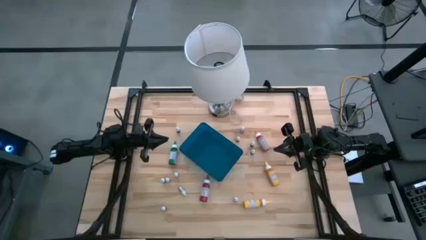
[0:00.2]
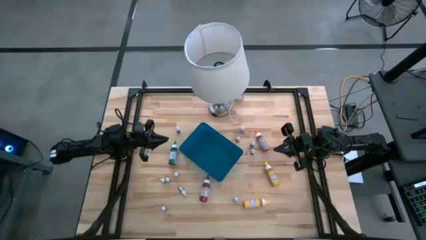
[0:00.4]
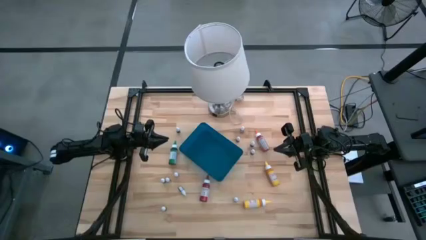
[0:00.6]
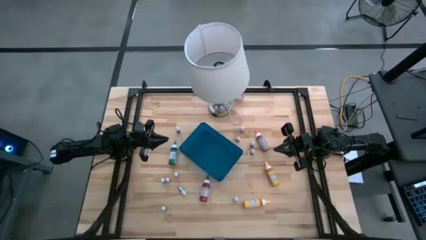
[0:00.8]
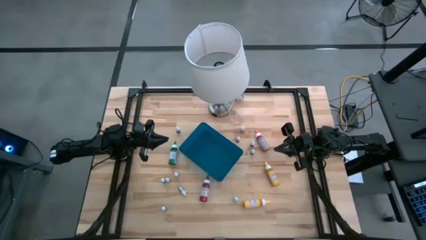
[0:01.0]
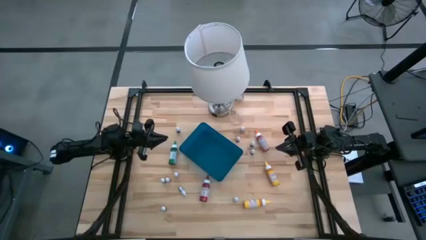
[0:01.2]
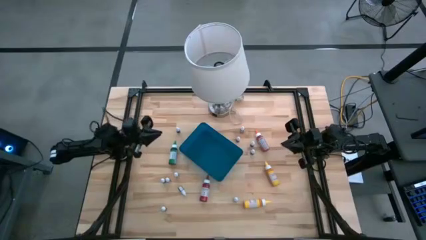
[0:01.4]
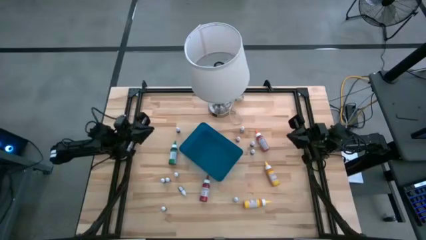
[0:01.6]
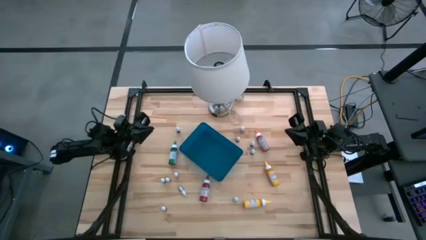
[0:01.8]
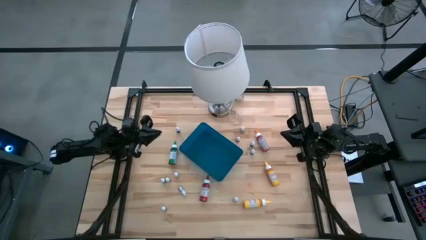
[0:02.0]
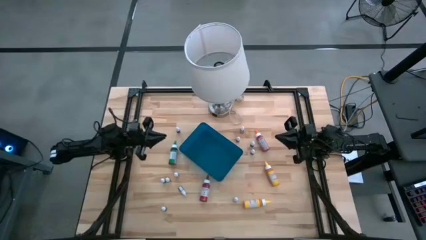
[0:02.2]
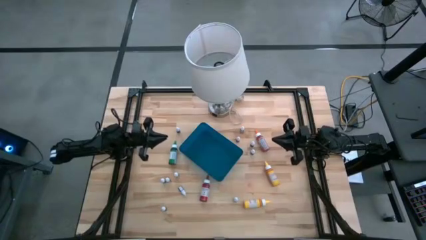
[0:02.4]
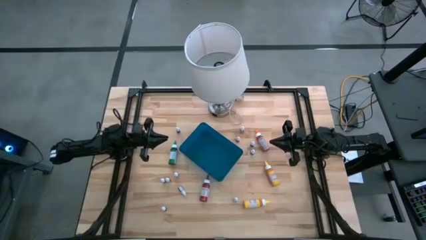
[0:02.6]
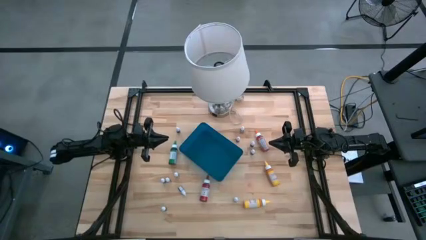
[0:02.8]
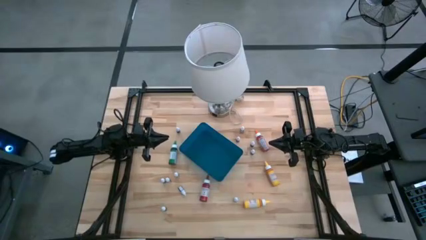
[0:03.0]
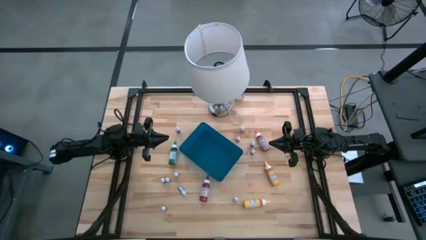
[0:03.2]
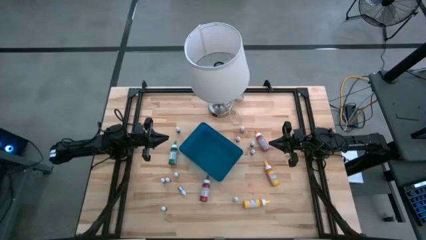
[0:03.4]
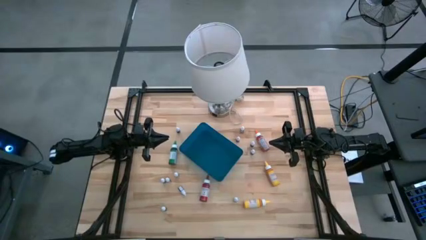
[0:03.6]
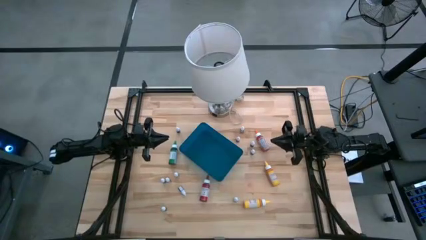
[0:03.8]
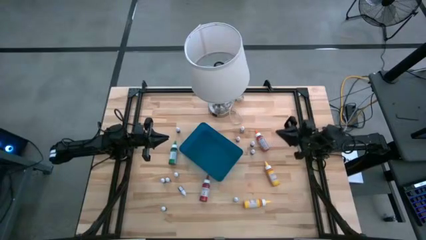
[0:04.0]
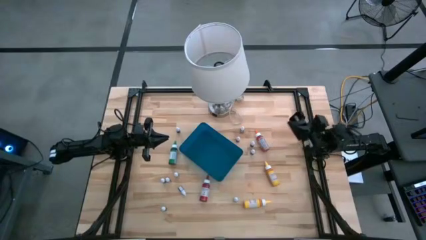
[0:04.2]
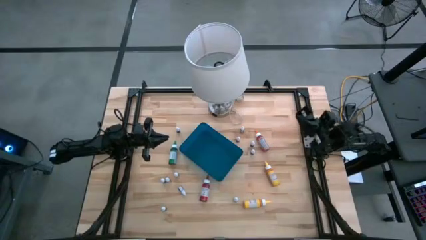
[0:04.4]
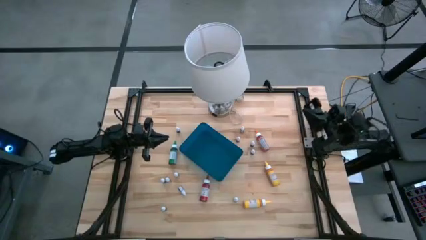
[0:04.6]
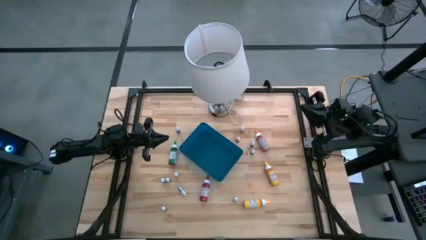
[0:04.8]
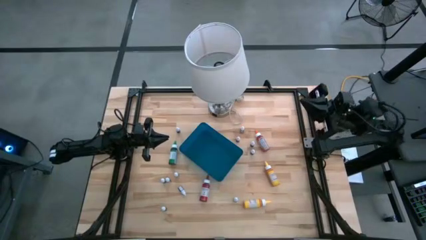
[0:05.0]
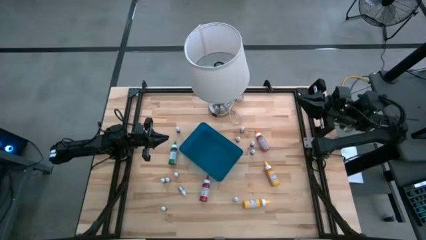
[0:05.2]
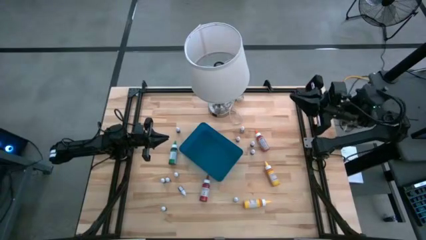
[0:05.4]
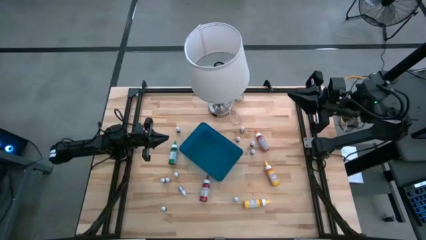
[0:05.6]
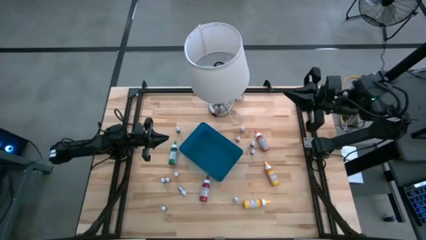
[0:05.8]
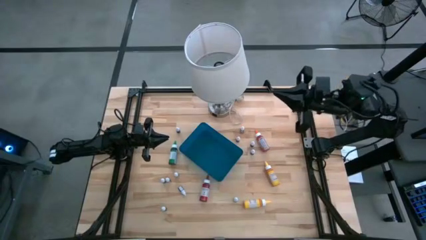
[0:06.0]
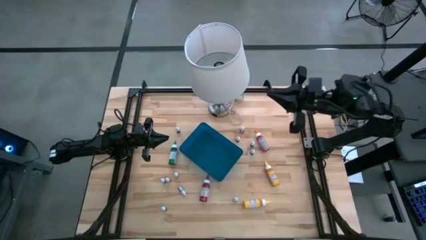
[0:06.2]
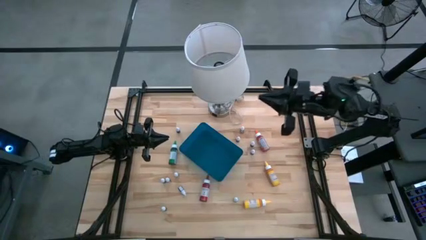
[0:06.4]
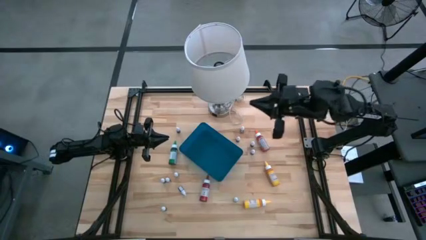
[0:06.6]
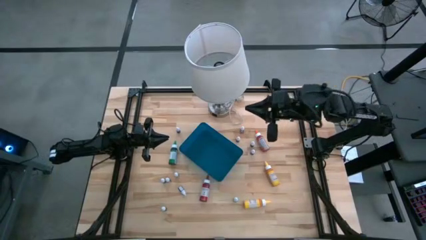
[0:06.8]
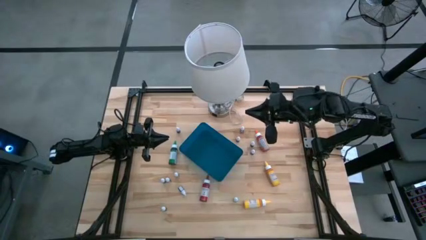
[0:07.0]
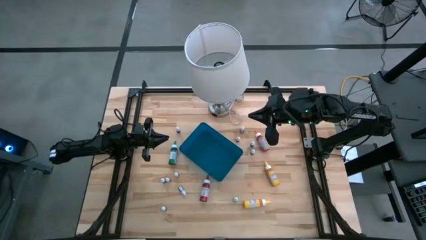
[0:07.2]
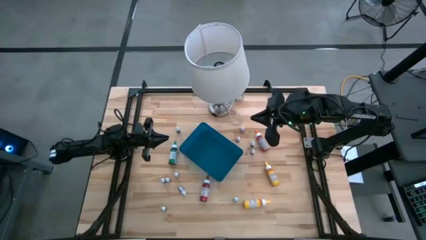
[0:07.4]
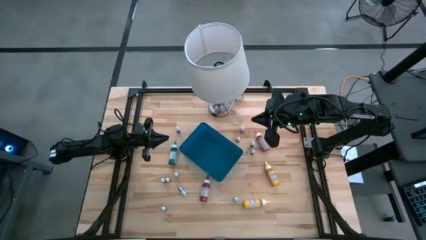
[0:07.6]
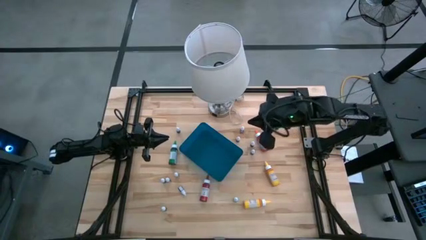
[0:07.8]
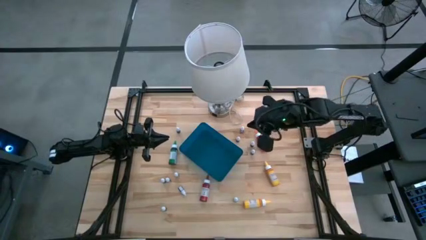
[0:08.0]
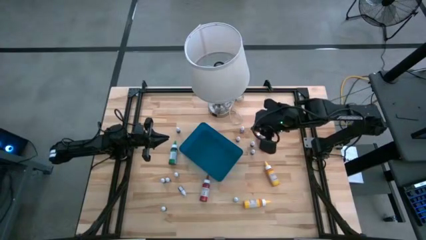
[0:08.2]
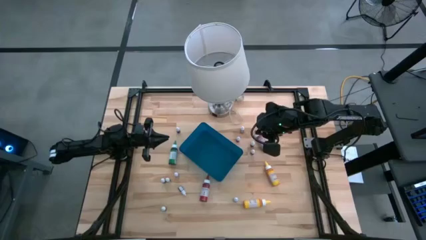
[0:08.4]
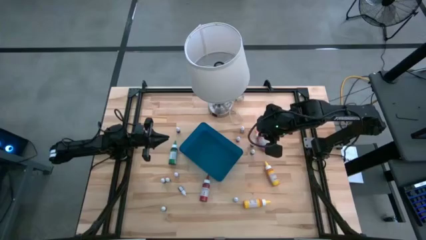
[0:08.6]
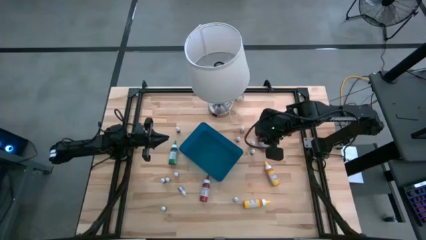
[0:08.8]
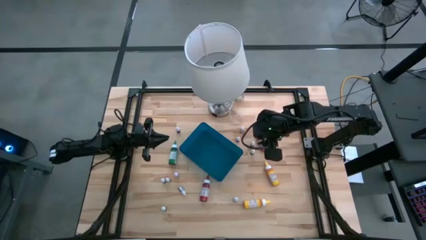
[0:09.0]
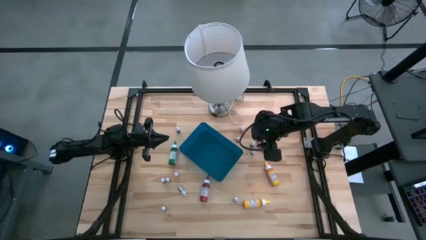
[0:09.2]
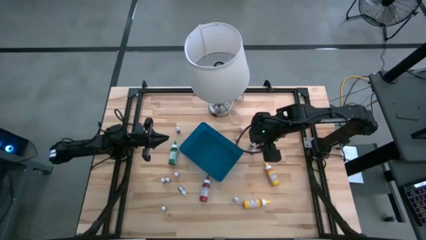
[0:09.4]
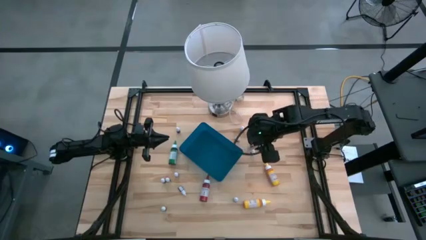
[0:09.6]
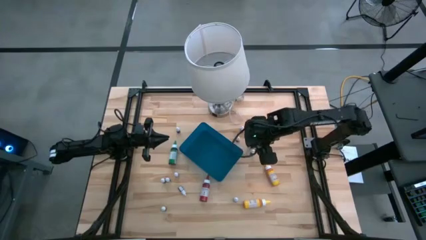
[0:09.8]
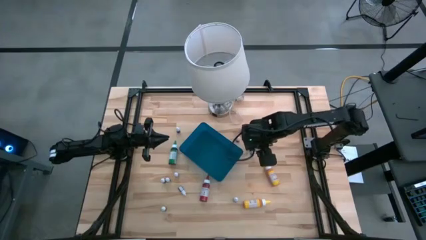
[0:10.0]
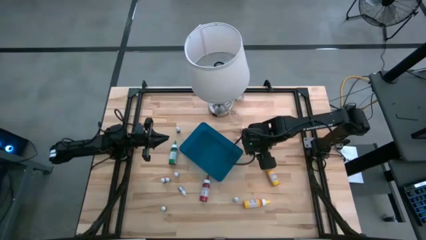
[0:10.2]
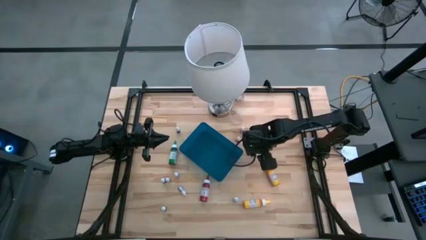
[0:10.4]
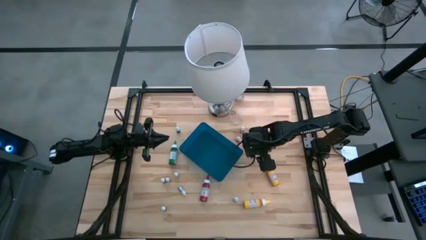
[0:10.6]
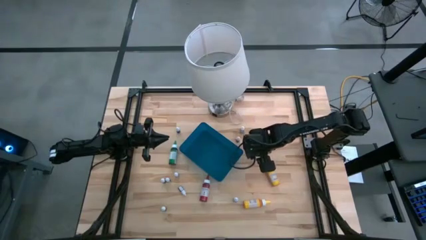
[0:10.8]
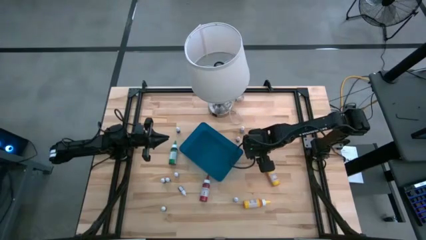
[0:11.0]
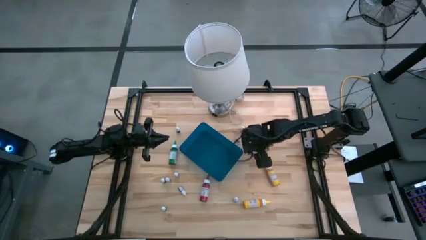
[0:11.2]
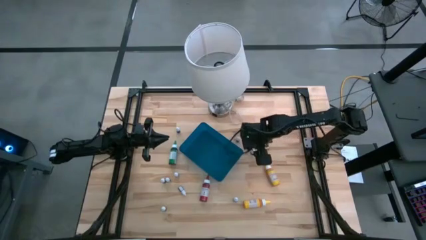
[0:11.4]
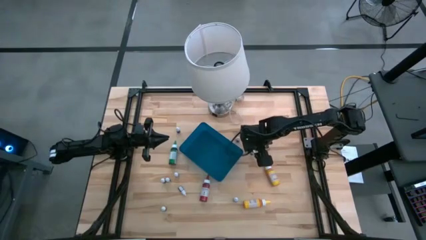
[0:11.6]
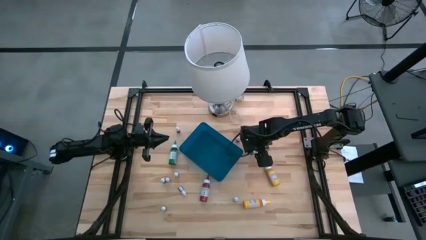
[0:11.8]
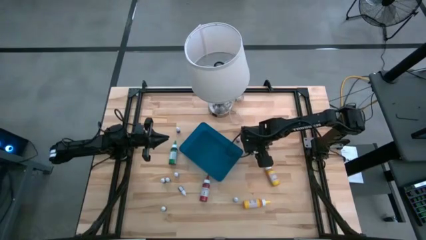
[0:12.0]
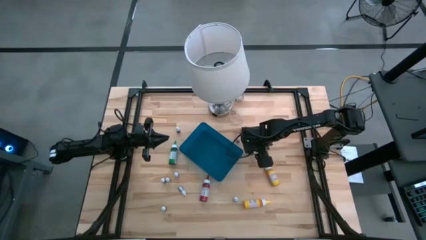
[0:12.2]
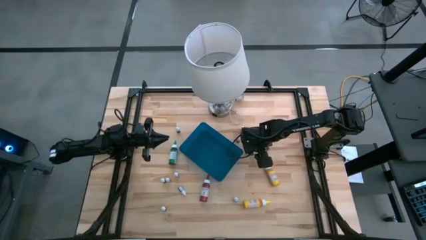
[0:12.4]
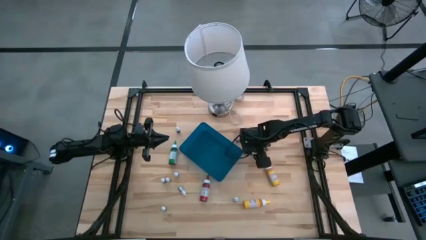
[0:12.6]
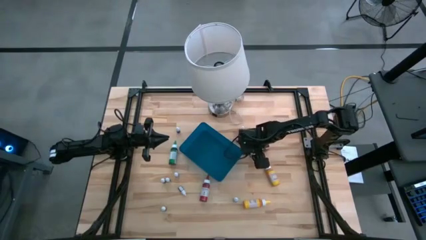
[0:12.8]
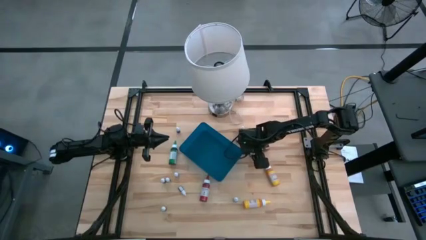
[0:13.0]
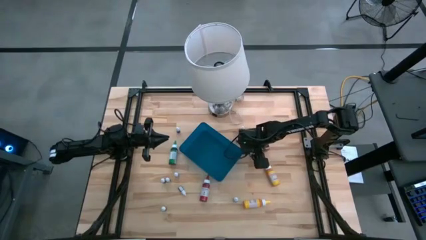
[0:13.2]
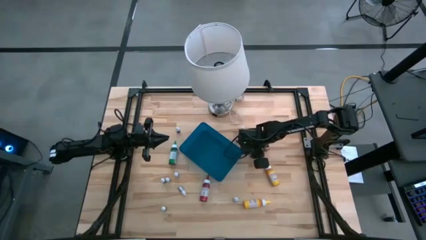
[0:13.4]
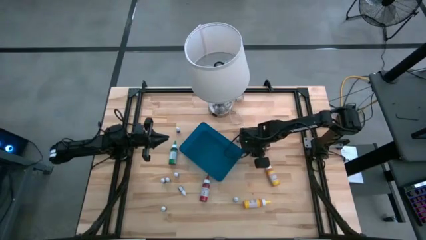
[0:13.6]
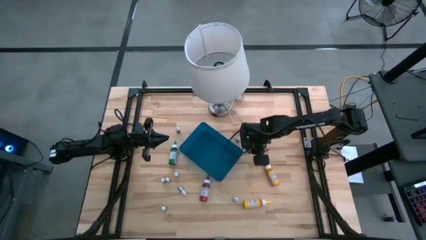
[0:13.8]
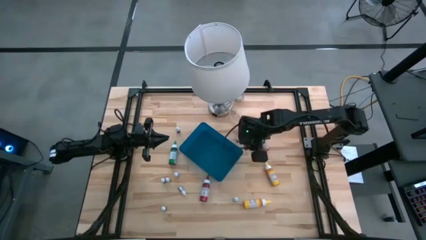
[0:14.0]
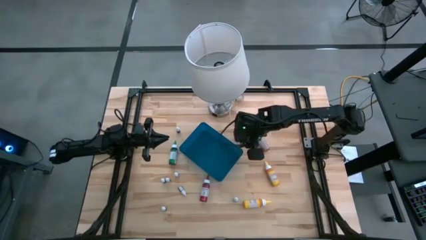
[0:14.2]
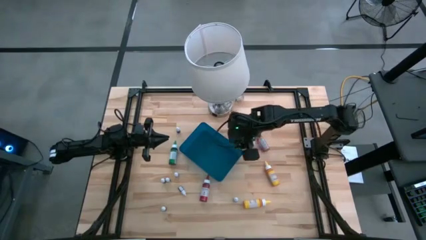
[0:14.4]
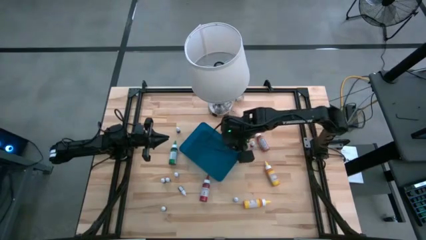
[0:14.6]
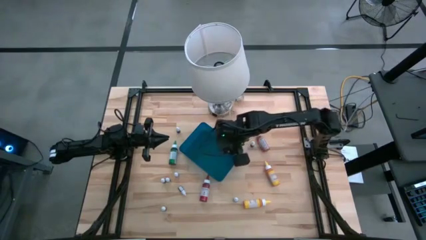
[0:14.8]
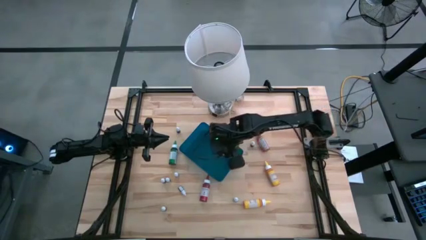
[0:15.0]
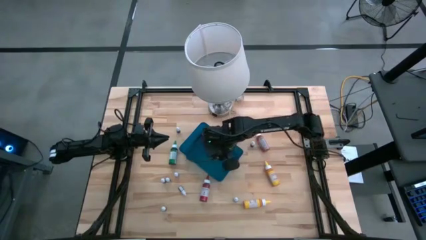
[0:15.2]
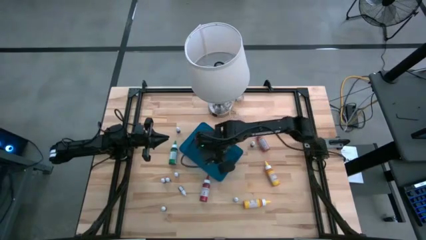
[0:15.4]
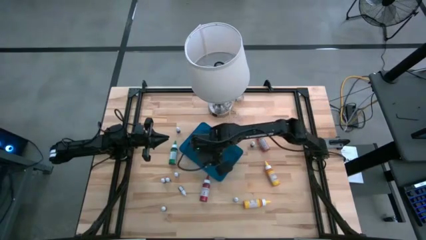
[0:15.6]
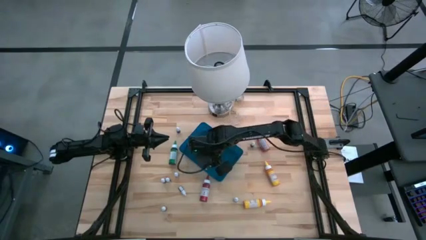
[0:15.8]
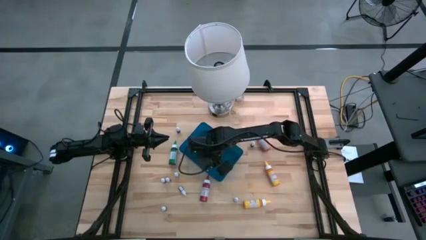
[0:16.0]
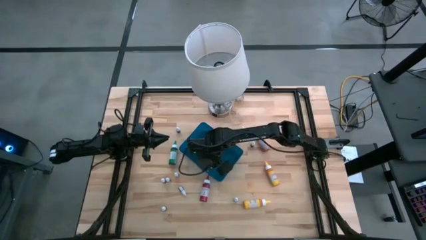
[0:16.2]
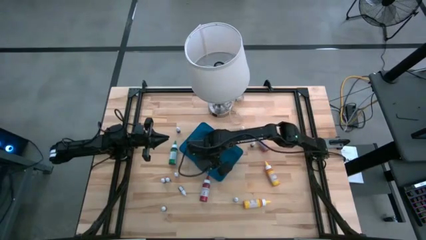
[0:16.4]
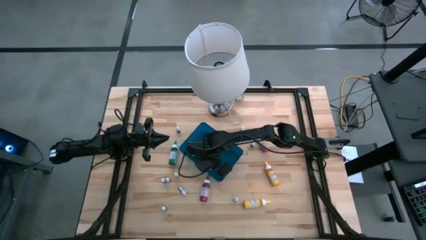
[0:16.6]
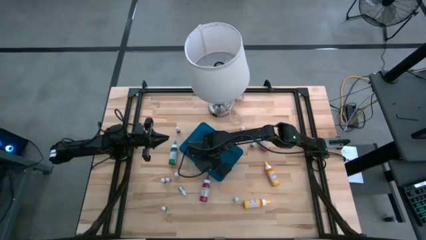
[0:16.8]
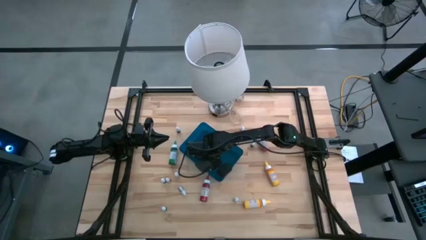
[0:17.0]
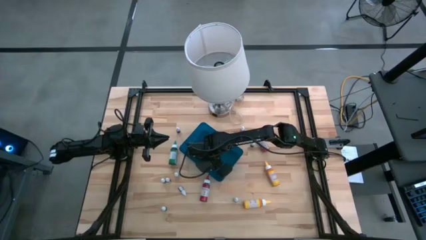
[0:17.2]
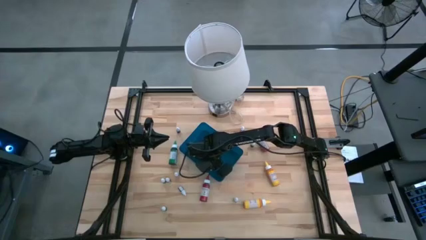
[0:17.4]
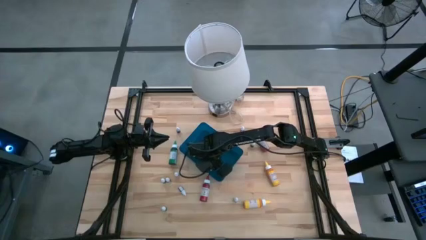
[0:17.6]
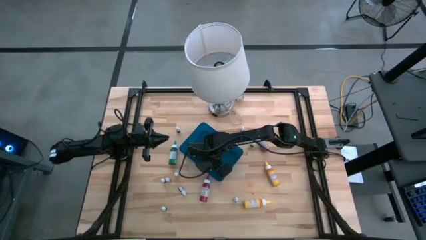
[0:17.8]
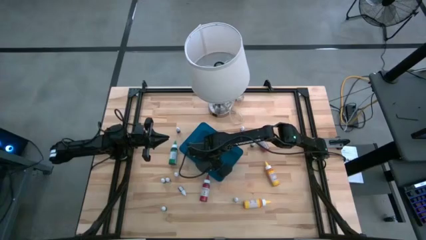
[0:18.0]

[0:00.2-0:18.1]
Task: Pick & Place food coloring
Put the small red food coloring bottle into the blue container
